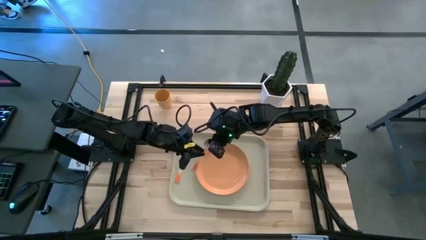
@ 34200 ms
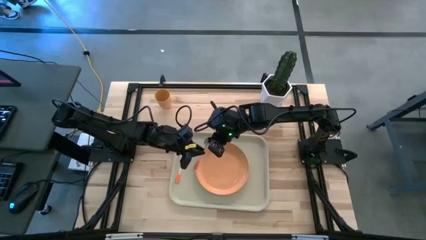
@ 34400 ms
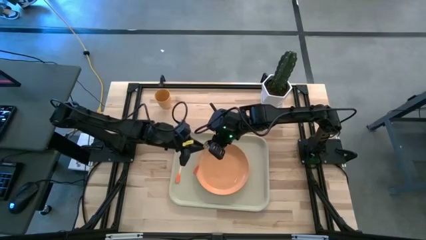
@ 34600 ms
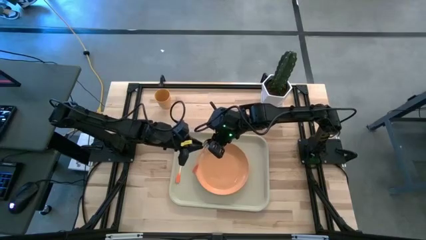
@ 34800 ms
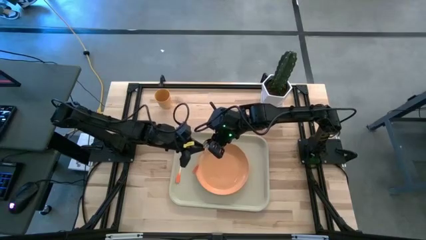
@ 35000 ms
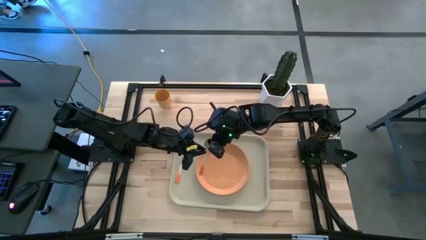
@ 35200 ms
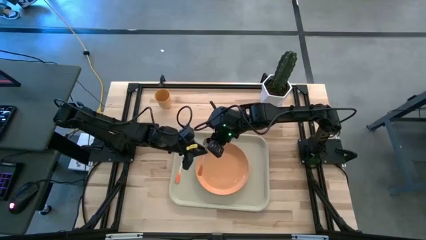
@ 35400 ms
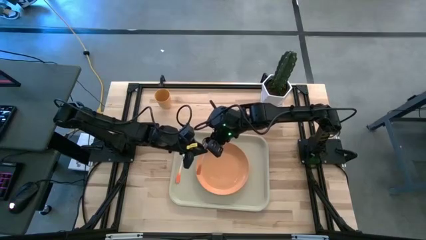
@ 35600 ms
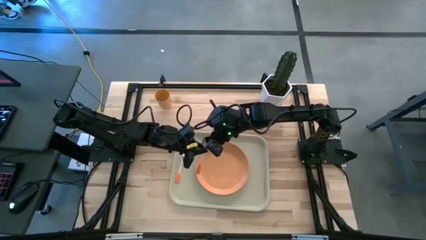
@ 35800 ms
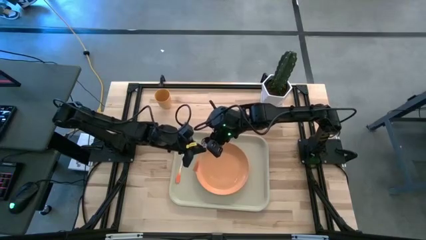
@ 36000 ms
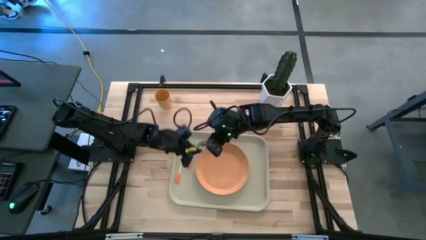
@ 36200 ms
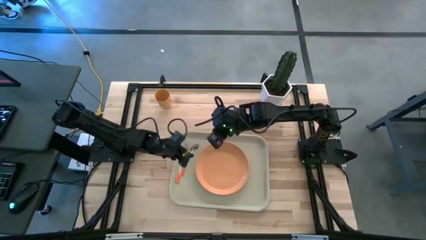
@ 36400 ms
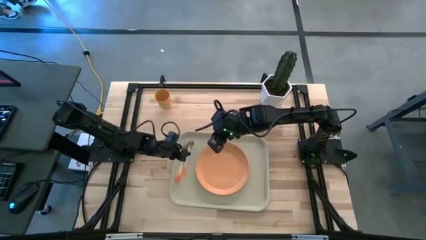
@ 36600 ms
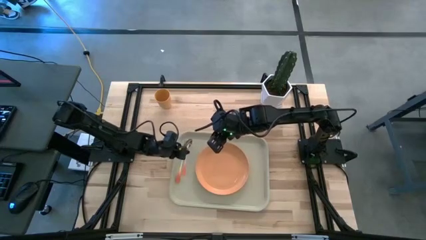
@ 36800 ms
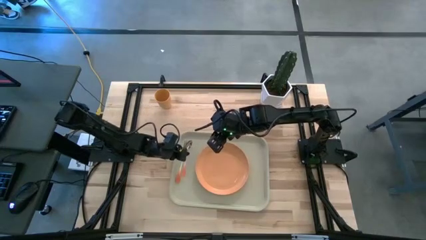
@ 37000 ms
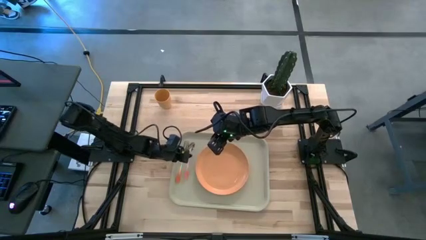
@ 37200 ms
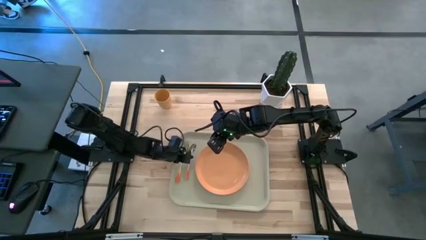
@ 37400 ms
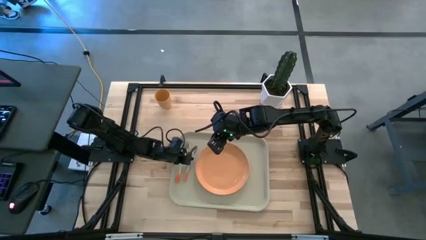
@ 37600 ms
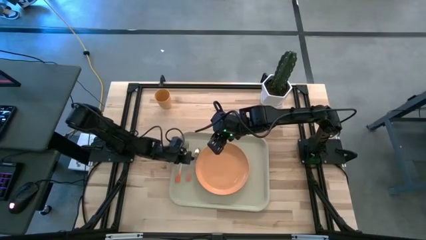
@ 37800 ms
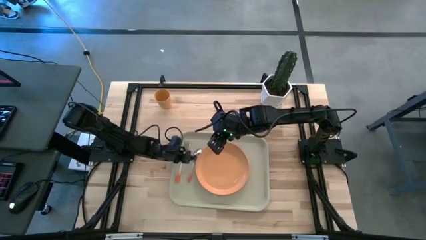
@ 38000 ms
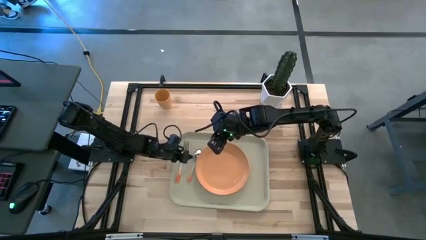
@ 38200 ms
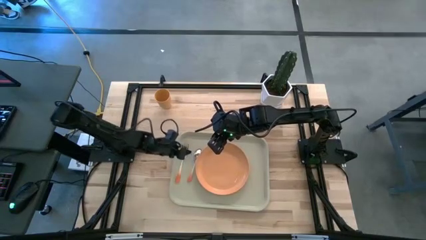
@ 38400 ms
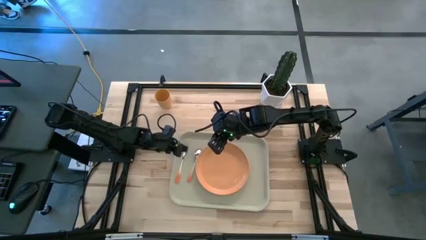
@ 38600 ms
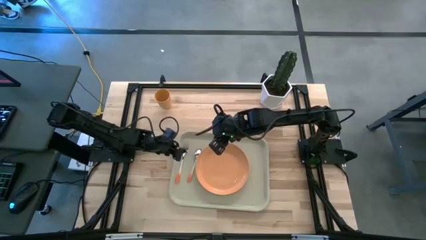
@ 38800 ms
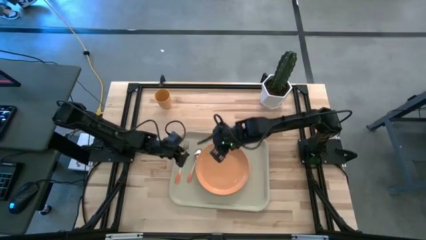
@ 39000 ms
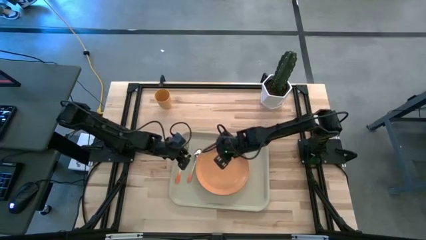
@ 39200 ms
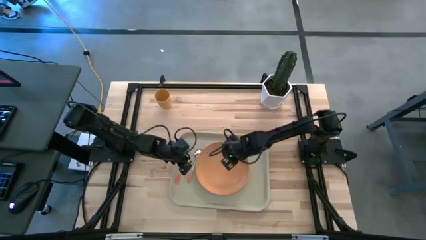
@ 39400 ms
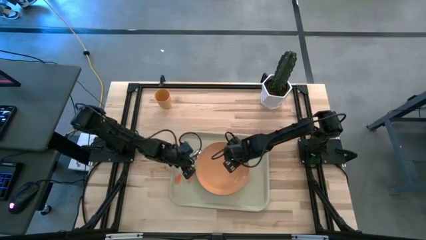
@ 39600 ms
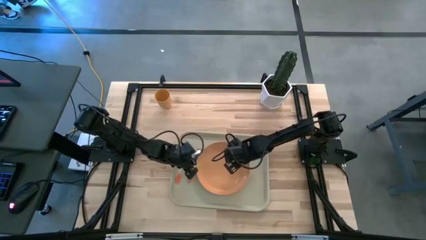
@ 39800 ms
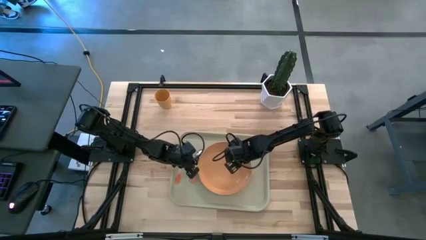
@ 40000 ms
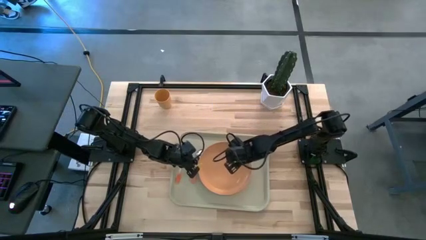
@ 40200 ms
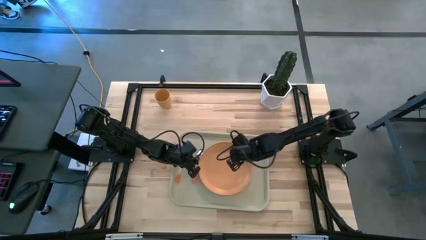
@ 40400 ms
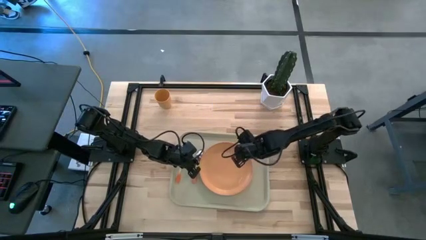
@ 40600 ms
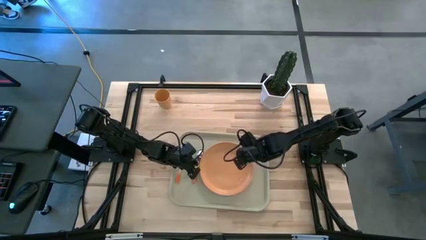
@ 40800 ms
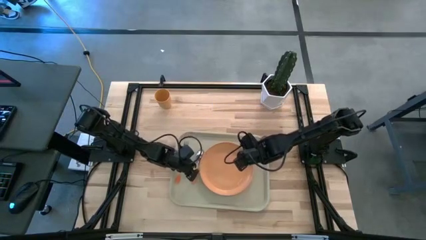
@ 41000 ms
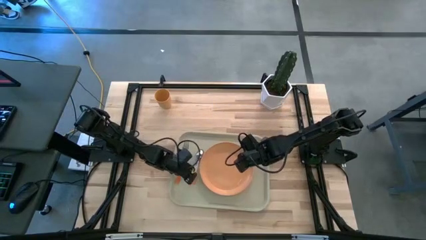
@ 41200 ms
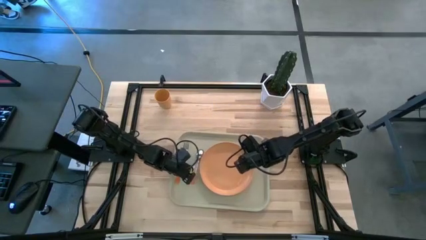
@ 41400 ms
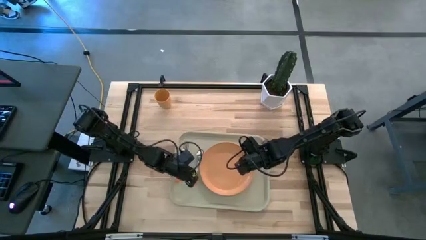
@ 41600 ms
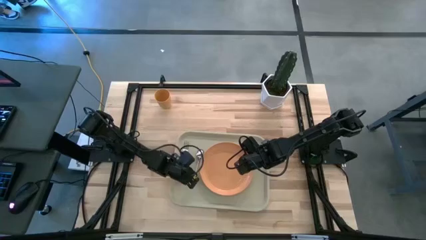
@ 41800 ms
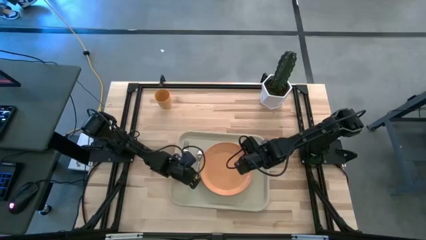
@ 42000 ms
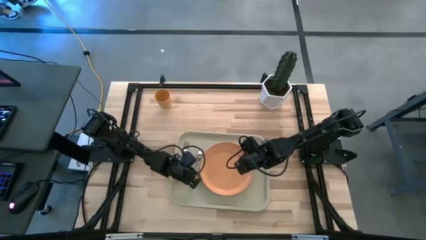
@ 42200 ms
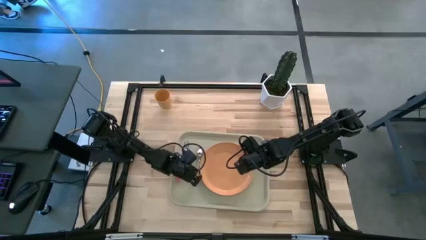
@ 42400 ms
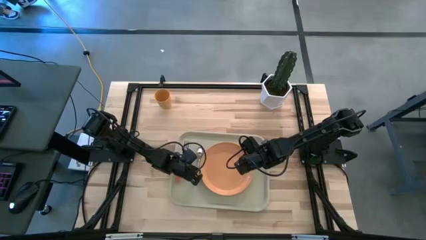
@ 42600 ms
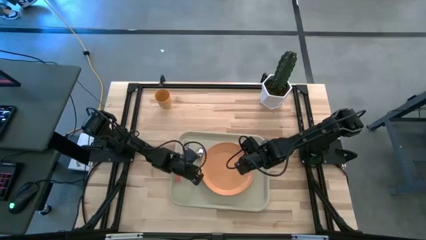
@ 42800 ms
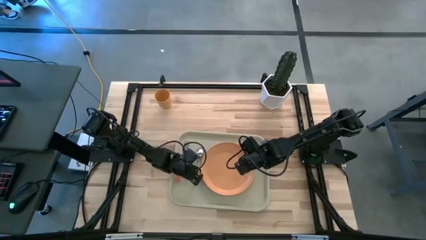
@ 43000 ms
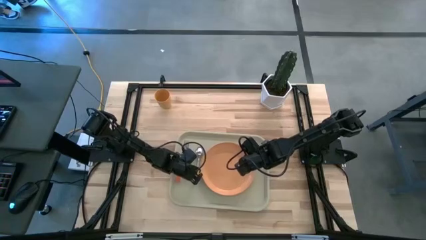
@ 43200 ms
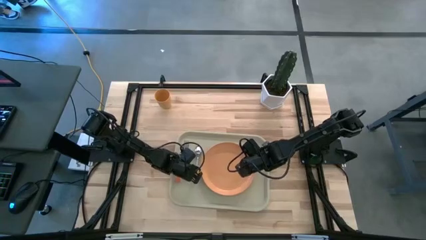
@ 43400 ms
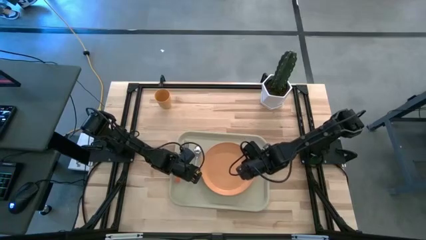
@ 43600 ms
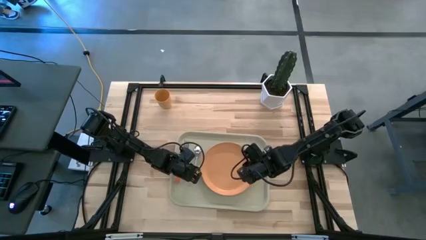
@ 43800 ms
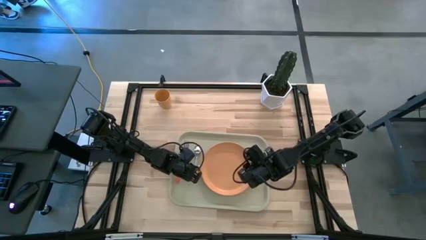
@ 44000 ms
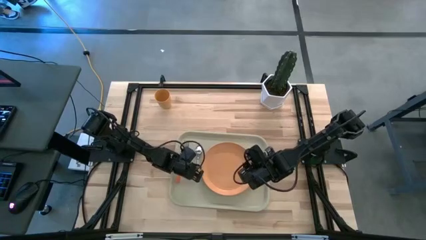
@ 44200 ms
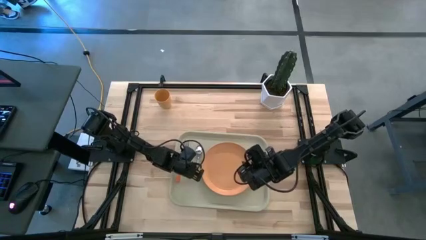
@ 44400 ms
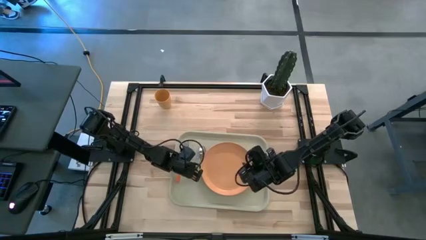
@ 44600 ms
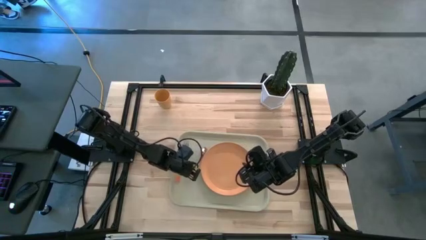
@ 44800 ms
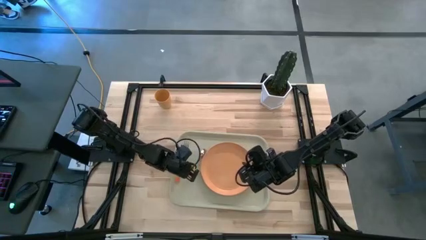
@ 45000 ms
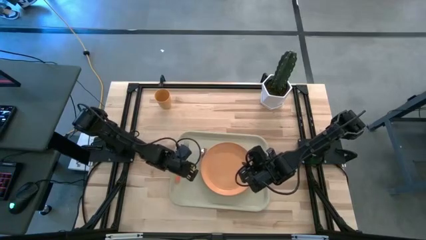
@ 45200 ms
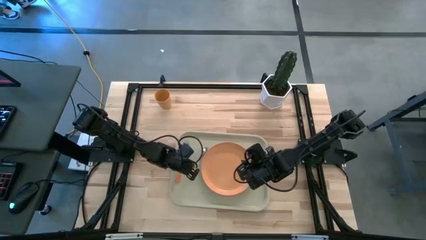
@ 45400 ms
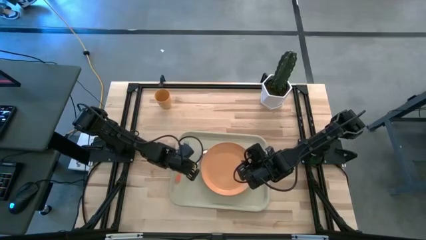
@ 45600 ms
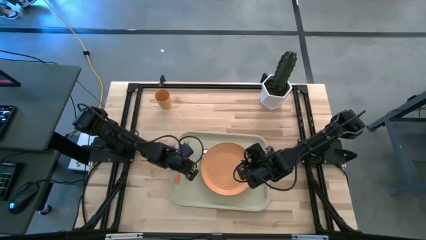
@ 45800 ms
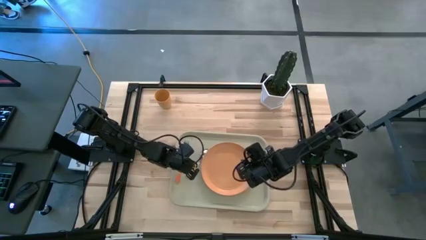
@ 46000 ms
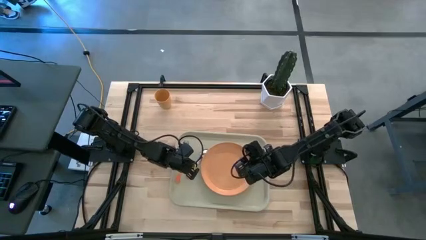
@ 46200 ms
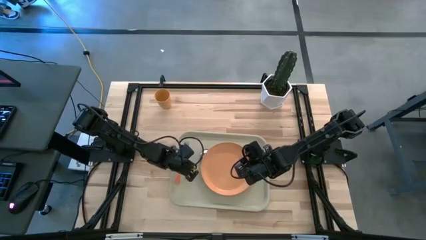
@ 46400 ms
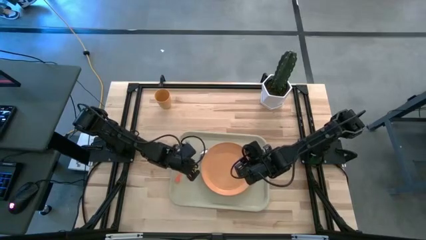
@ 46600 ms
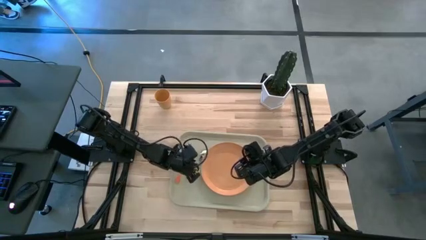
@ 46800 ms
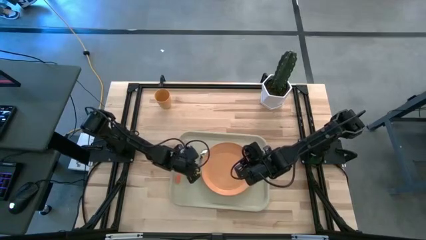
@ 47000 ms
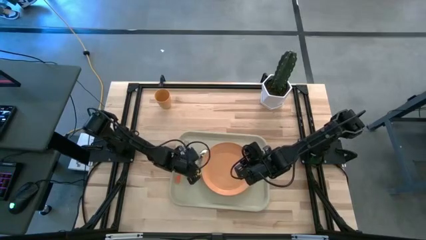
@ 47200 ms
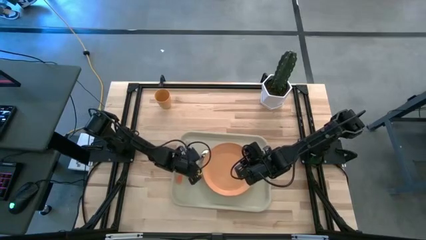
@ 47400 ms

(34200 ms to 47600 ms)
Task: Pick and place plate/cup/fork/spoon on tray
Put the orange spoon on the light brown serving tray to the left side of orange plate
